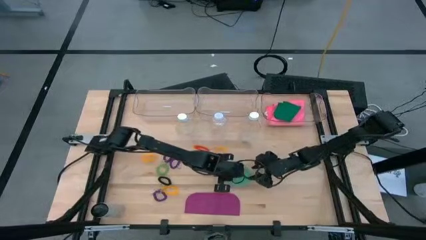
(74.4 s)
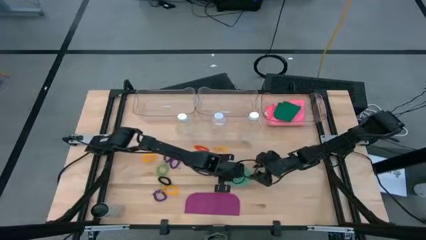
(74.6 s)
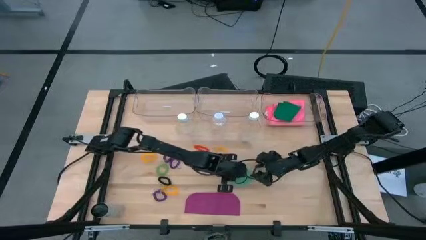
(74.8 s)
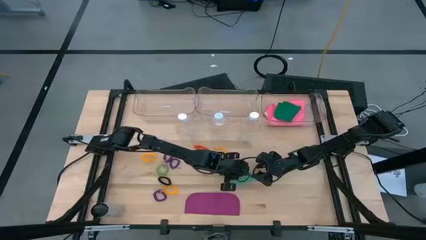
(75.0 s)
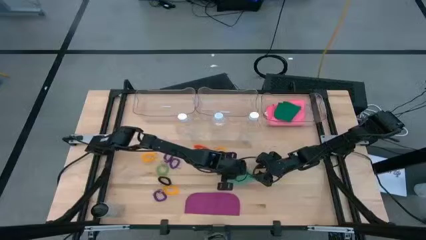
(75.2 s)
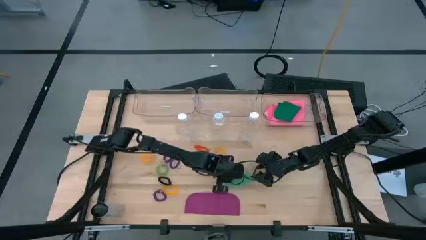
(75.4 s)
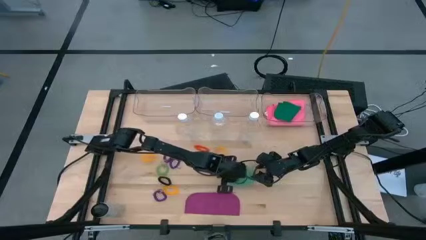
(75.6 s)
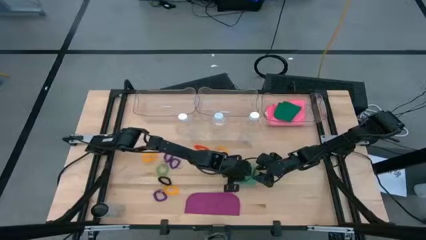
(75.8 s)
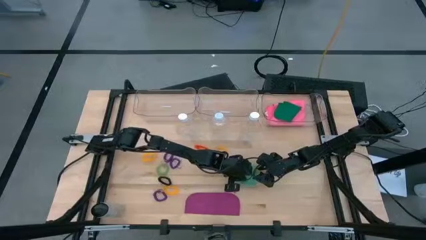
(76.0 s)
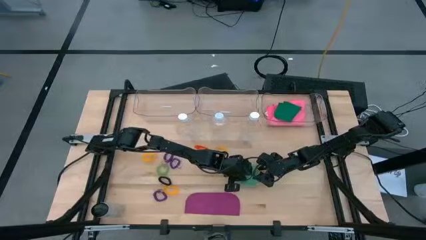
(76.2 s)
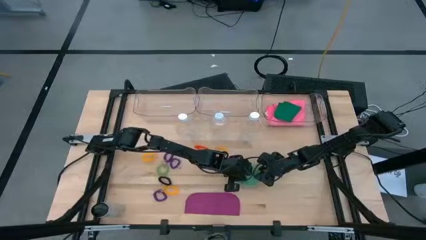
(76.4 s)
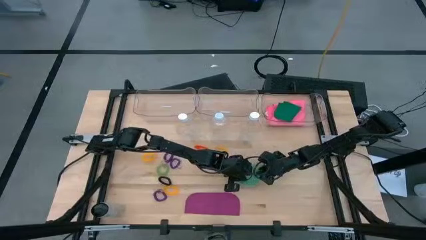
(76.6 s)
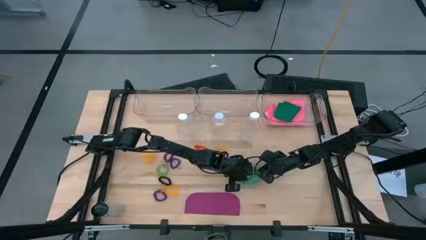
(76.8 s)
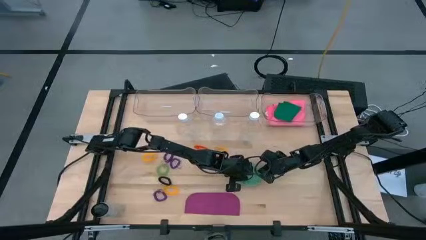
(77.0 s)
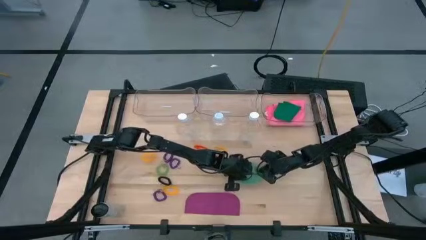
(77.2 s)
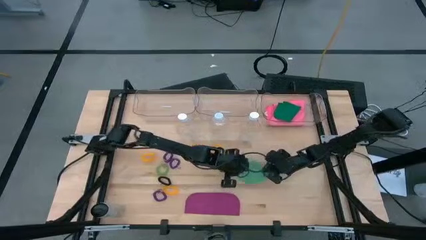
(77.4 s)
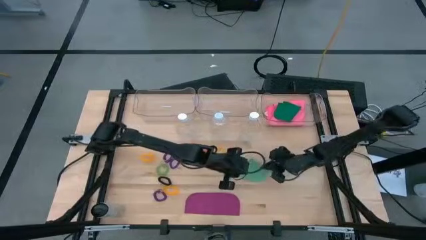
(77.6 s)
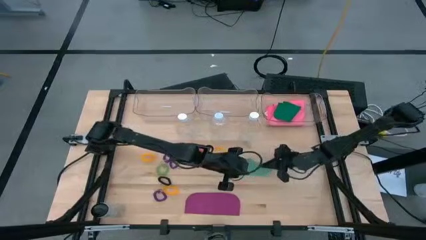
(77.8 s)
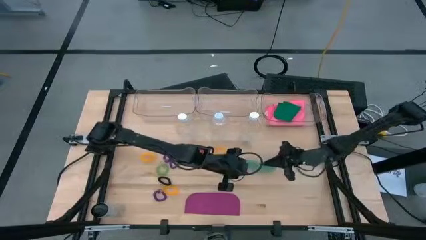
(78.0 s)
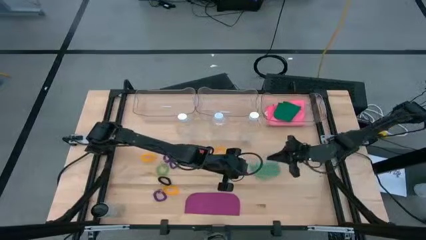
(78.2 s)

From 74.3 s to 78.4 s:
Task: Pick & Place Sports Items
Put the light green microfiber towel into the right transparent bin

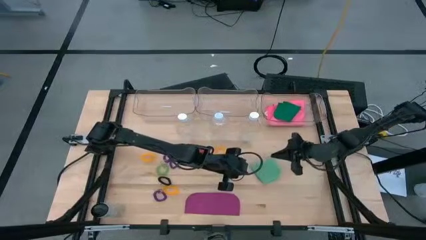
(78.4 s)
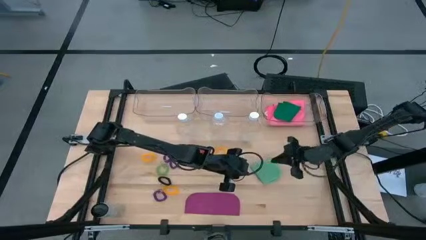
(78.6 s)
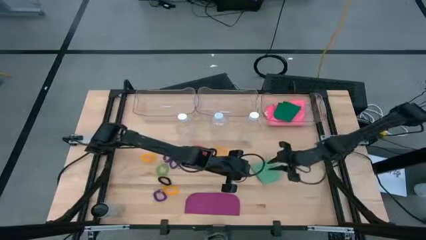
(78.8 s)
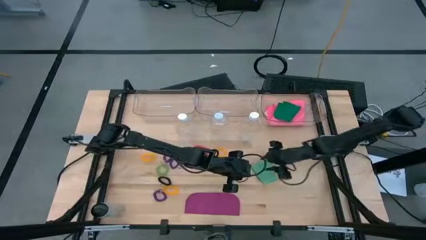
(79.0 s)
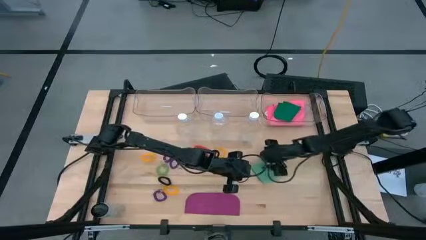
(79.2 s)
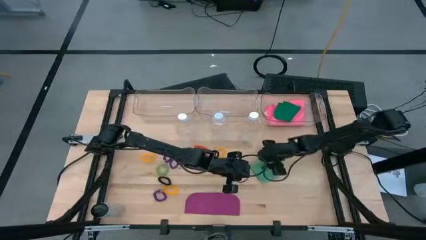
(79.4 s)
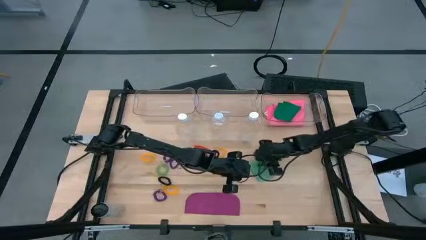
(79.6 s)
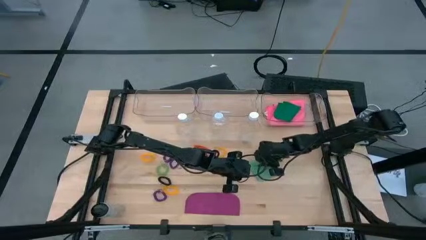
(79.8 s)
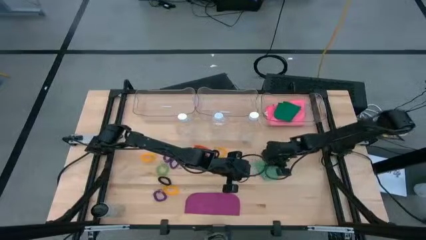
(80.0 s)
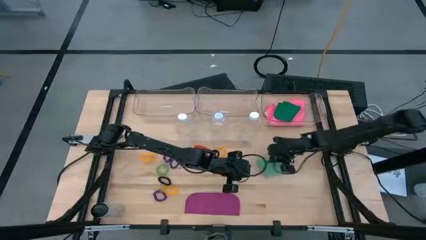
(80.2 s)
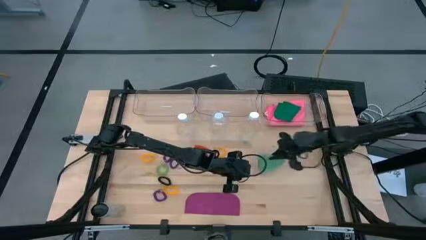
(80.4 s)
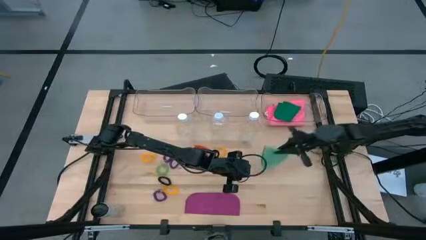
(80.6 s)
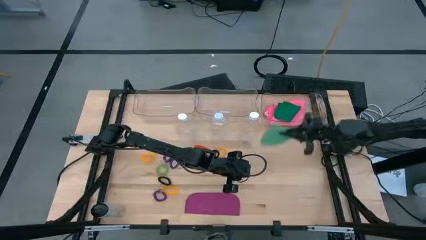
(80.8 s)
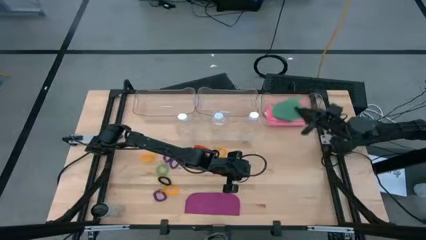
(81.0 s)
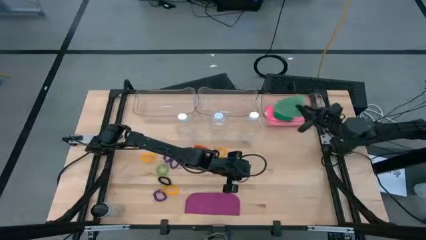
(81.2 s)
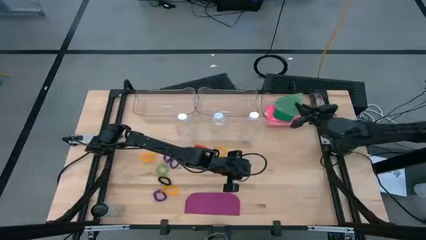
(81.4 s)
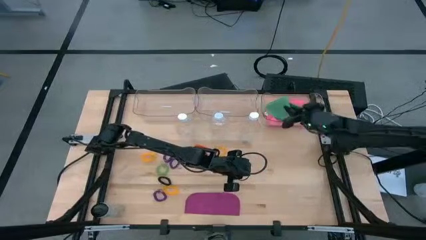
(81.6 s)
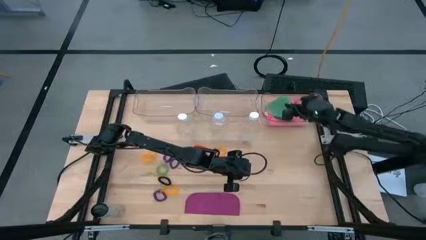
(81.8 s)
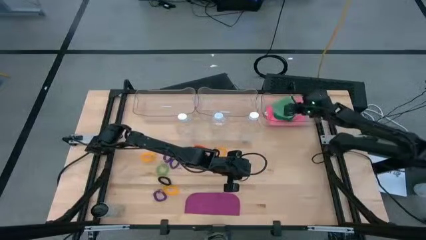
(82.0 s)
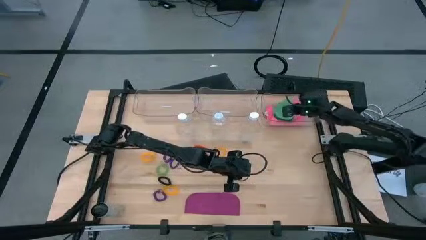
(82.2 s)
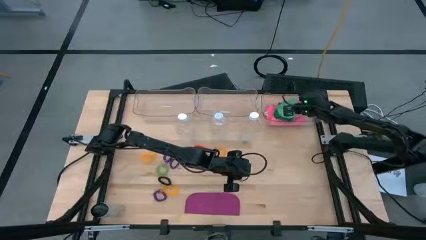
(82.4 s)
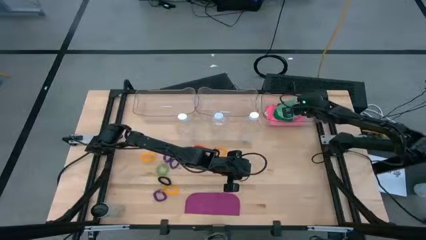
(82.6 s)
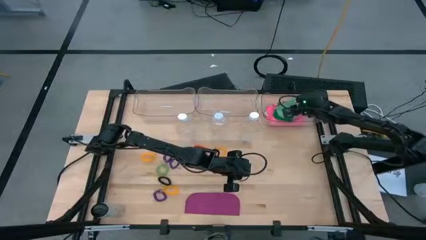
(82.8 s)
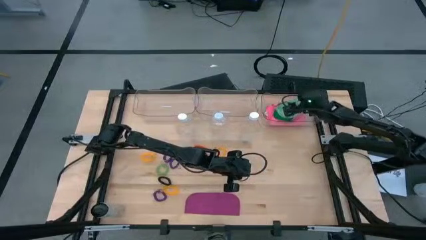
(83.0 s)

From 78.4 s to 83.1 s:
Put the light green microfiber towel into the right transparent bin

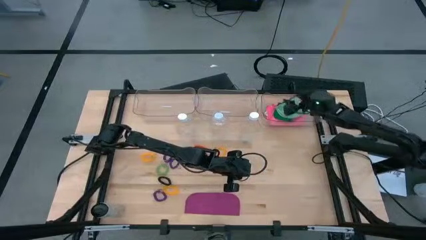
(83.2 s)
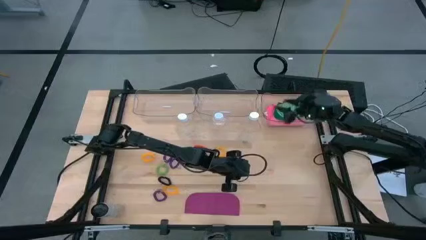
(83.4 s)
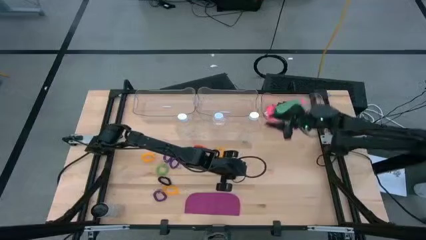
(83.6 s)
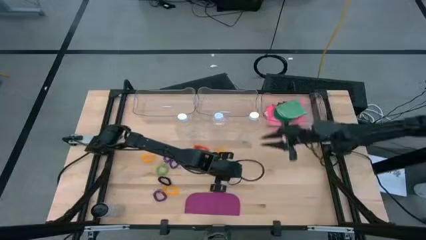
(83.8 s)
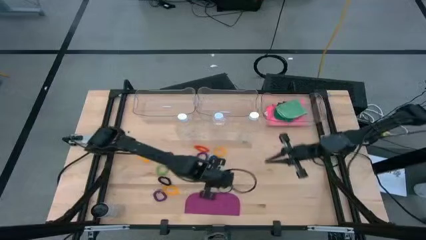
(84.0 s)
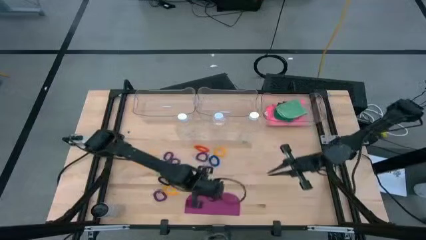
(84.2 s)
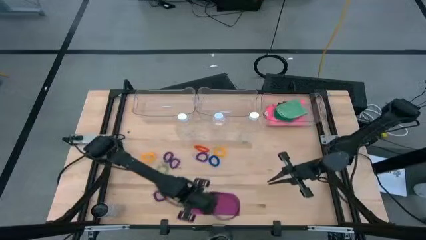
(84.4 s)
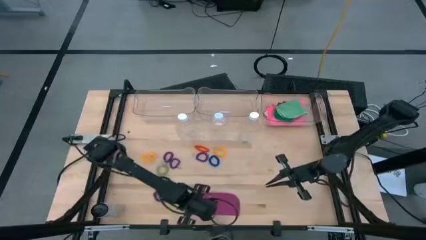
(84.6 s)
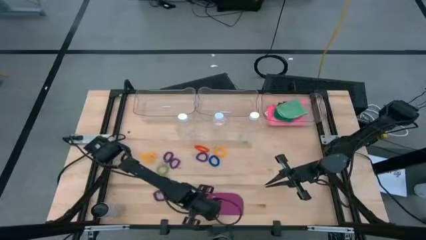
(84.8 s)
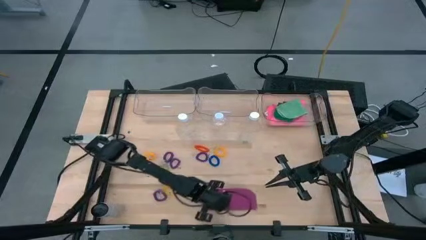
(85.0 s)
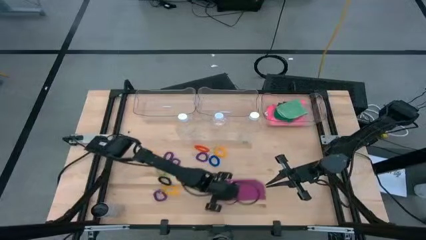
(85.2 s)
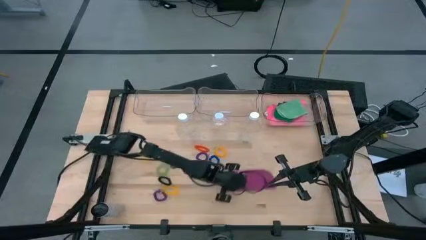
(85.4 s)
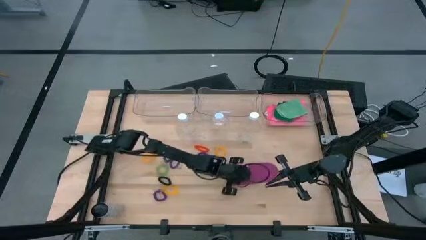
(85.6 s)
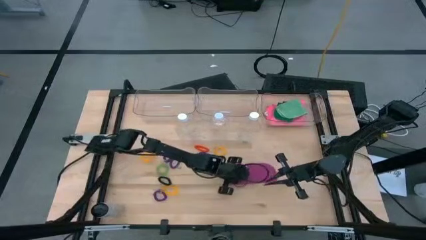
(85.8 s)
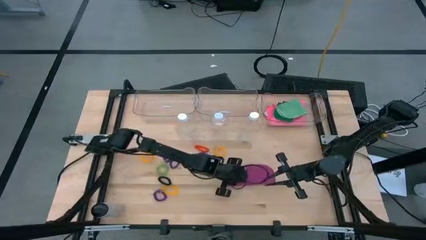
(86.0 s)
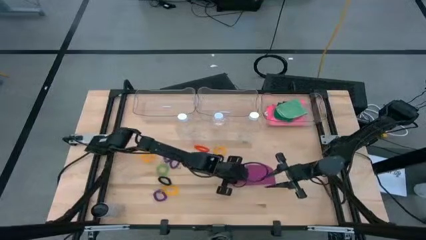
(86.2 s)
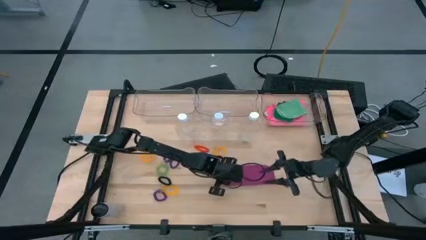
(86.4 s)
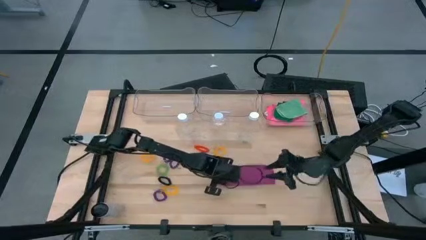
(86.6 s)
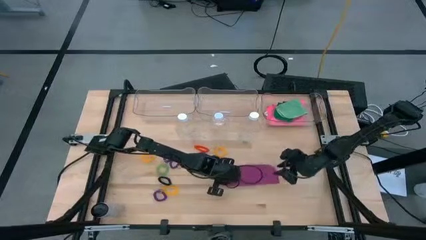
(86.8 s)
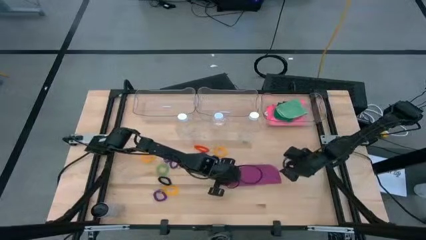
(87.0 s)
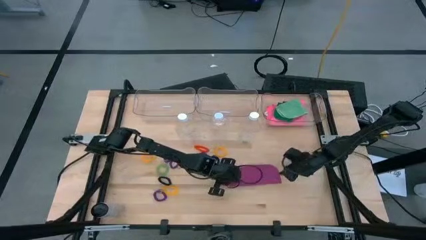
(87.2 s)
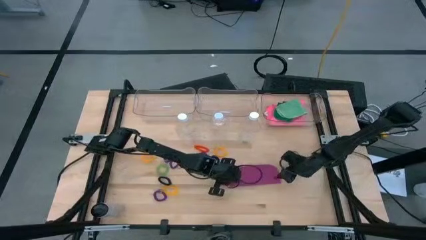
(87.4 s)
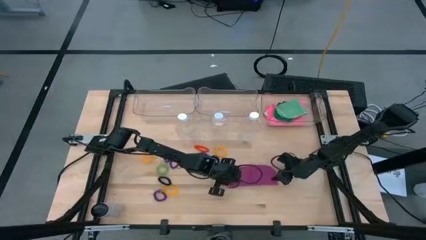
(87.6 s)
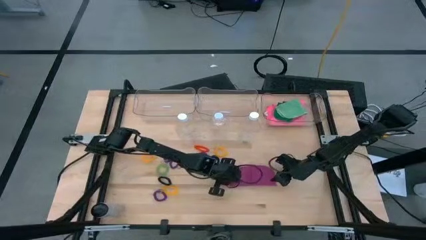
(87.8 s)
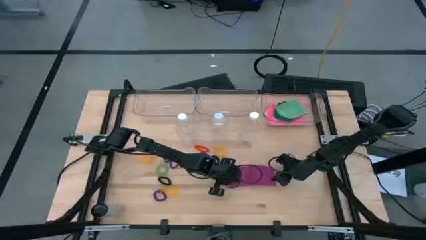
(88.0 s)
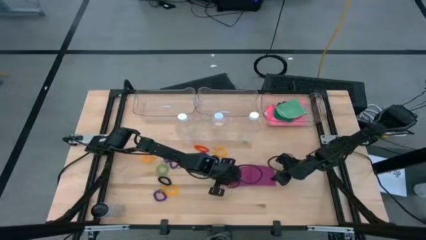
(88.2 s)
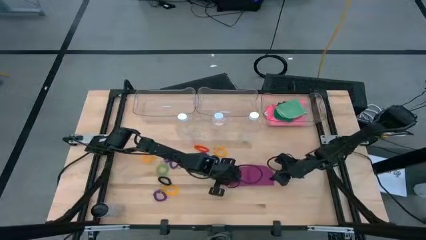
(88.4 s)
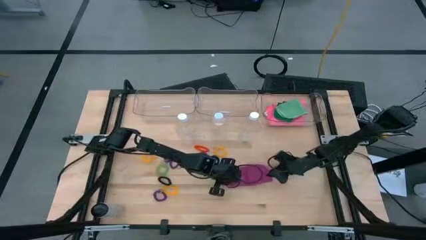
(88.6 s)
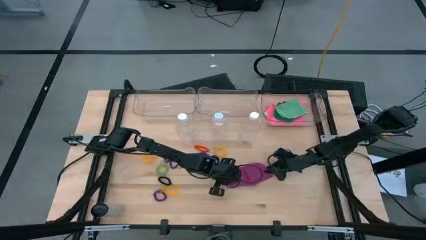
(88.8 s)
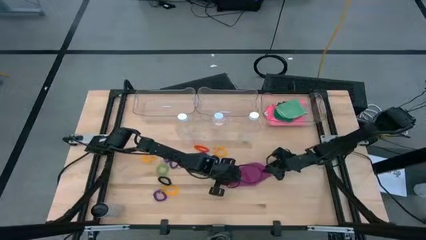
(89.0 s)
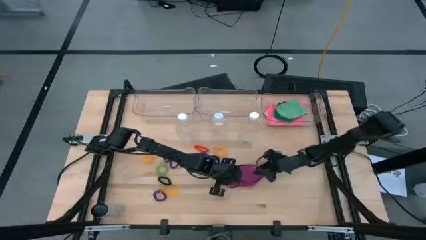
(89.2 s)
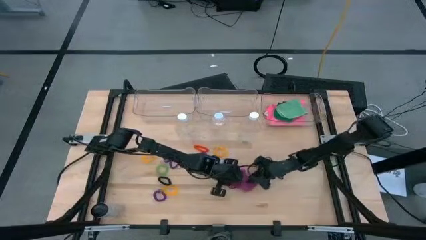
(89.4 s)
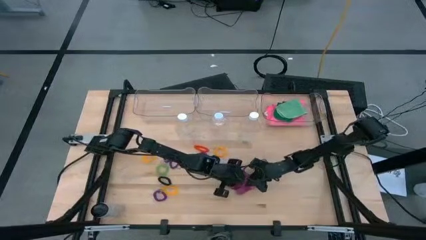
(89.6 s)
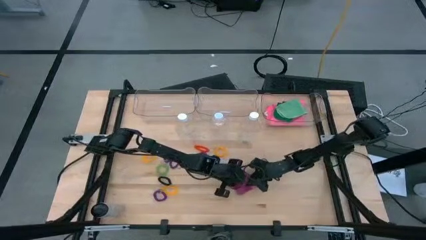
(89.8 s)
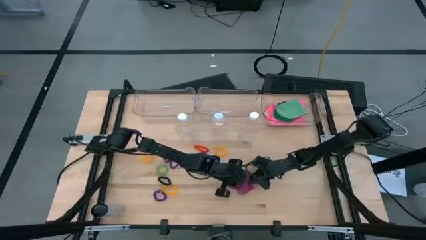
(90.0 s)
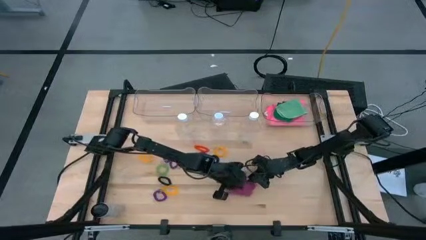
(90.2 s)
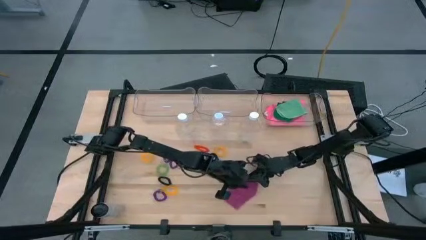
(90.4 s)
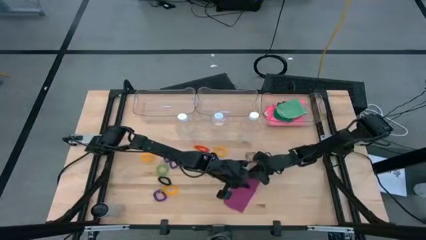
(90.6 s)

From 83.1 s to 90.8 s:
Fold the violet microfiber towel

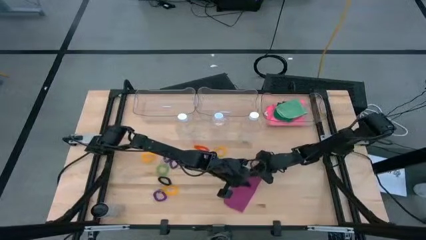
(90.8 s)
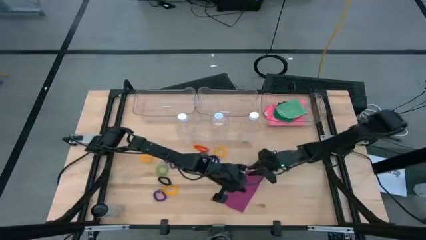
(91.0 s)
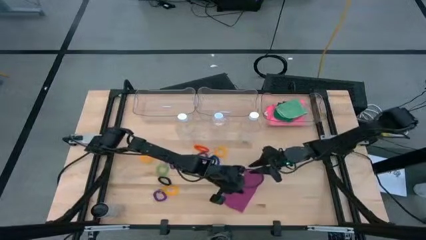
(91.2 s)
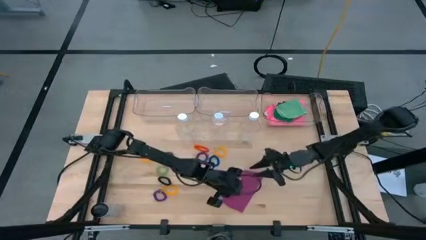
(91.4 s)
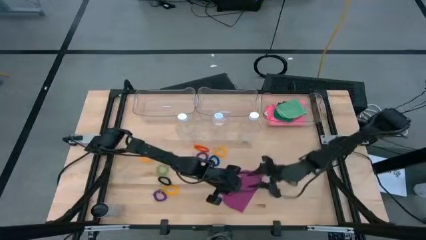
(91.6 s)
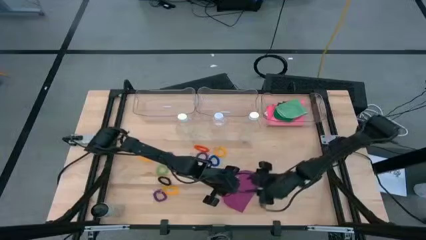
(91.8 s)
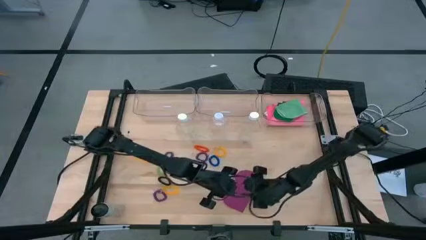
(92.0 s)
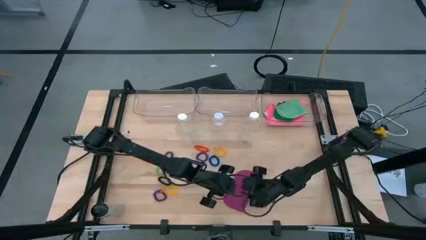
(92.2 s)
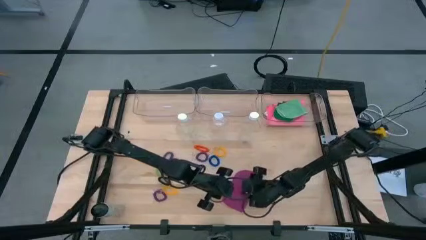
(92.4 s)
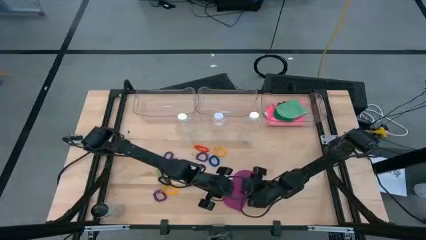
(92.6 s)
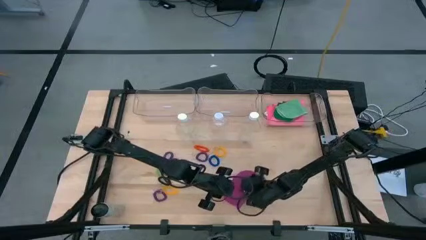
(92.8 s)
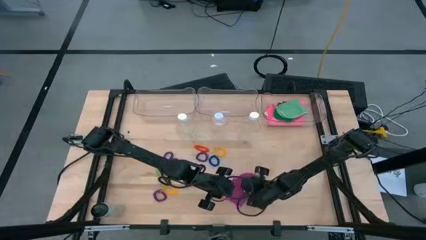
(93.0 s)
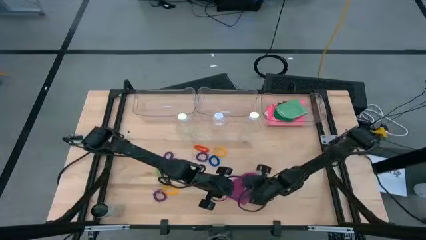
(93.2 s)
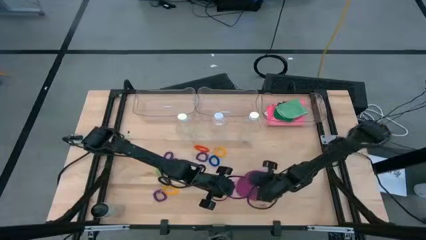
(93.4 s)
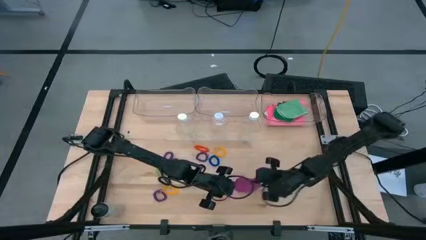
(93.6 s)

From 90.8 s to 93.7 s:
Fold the violet microfiber towel
